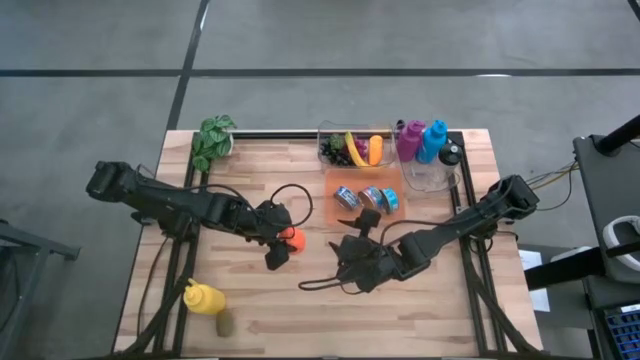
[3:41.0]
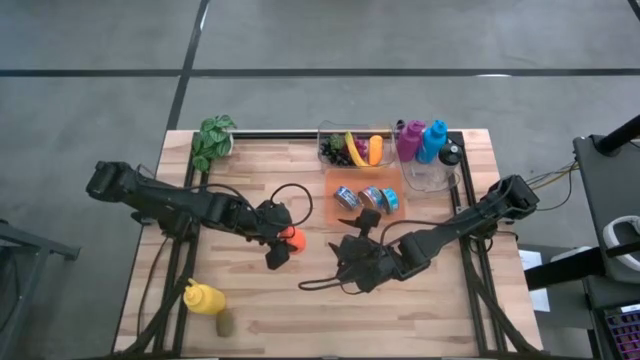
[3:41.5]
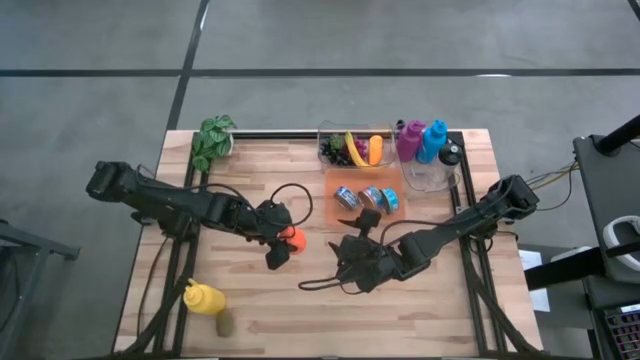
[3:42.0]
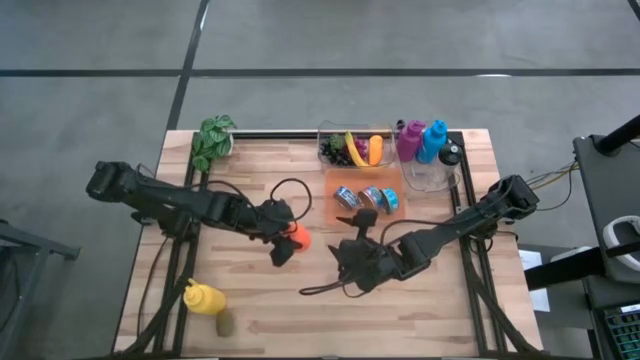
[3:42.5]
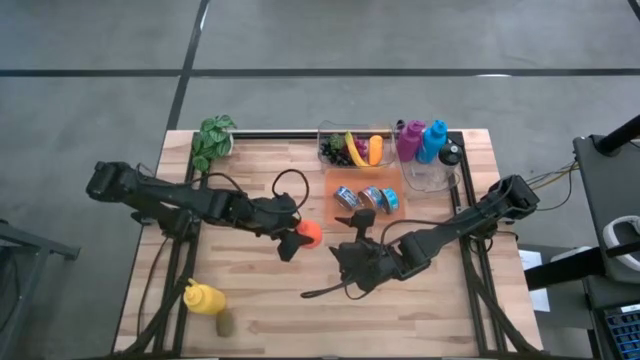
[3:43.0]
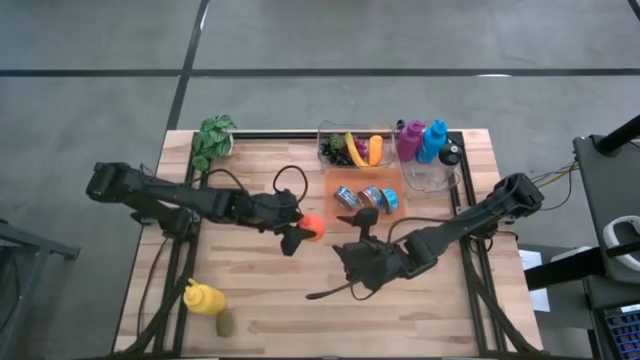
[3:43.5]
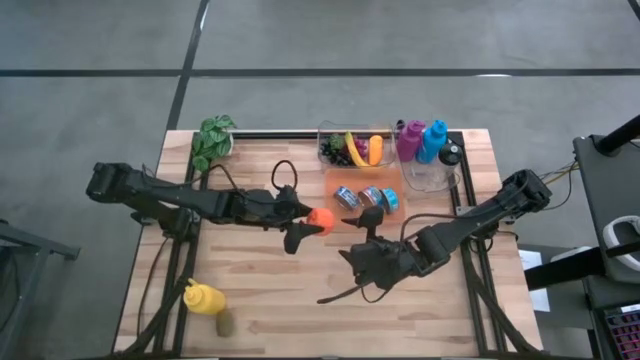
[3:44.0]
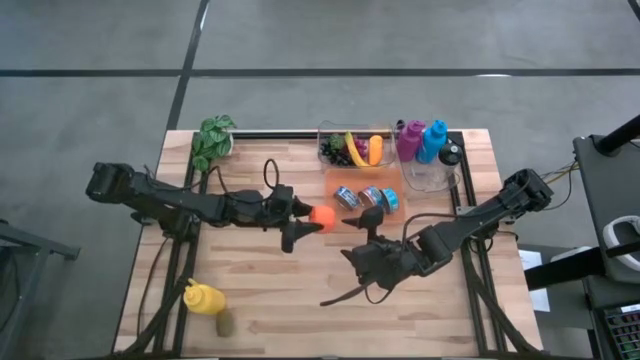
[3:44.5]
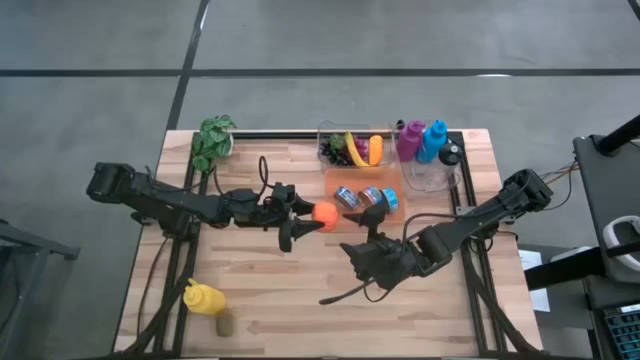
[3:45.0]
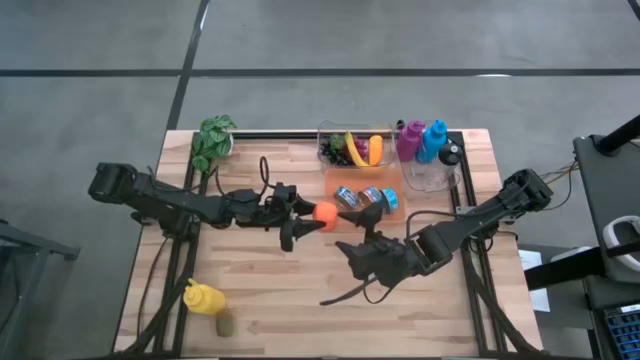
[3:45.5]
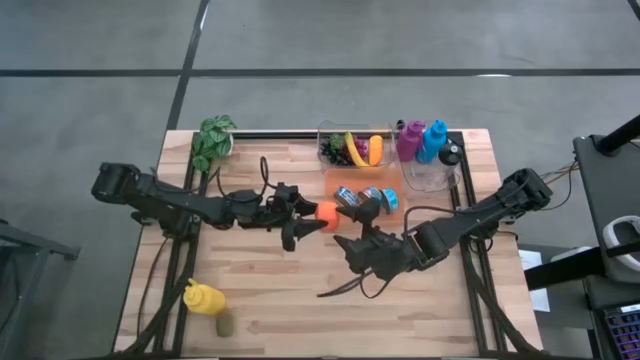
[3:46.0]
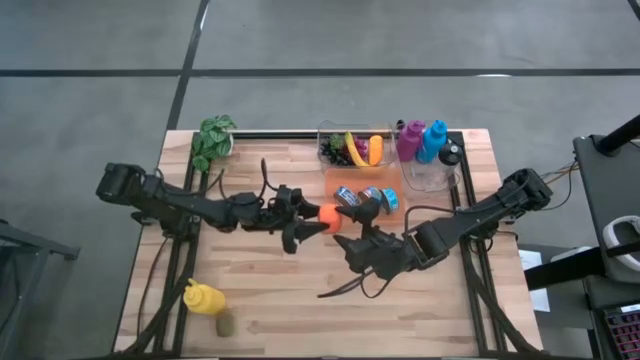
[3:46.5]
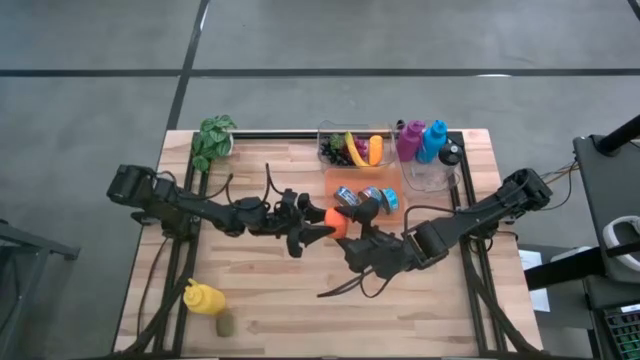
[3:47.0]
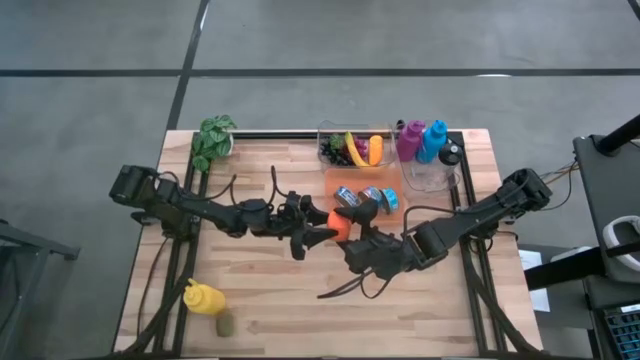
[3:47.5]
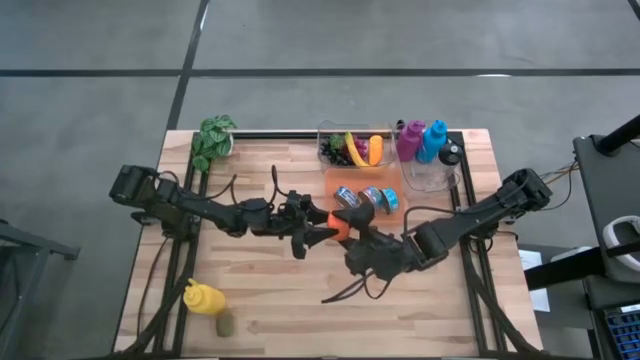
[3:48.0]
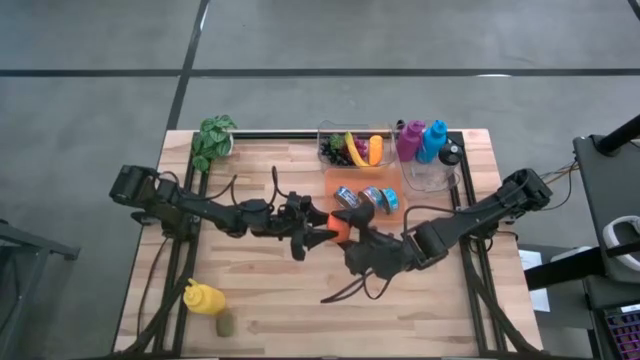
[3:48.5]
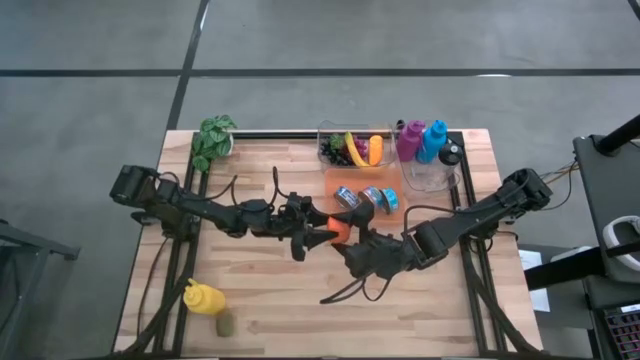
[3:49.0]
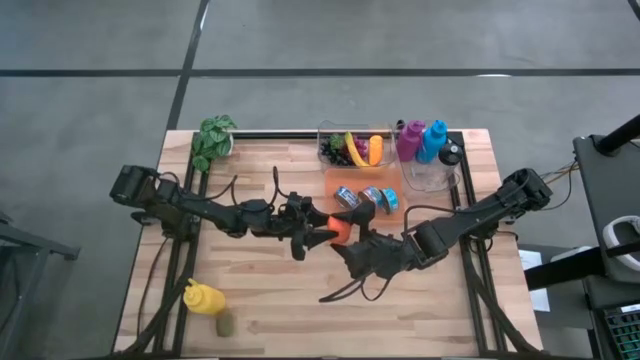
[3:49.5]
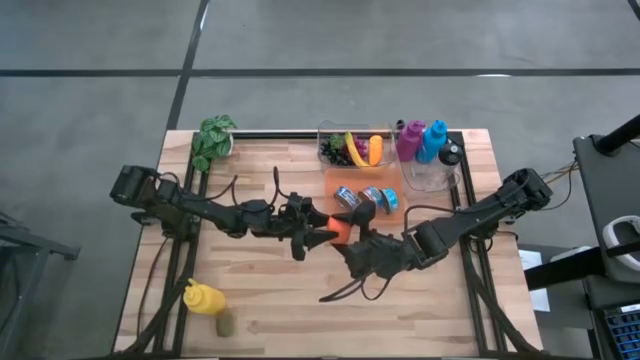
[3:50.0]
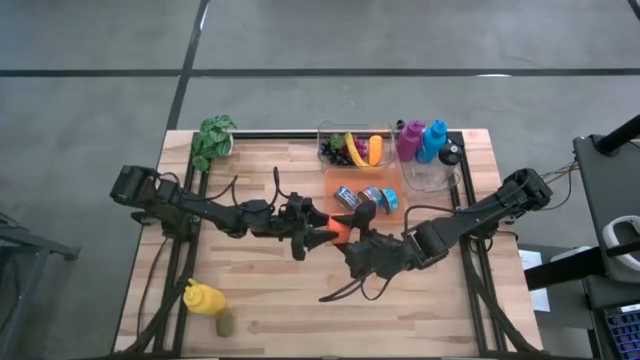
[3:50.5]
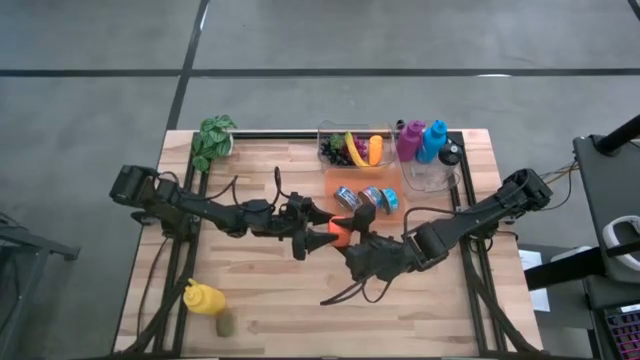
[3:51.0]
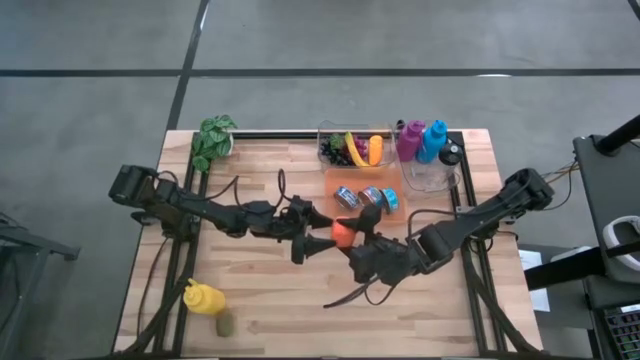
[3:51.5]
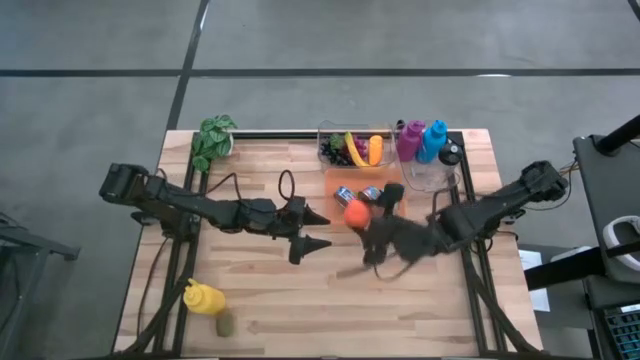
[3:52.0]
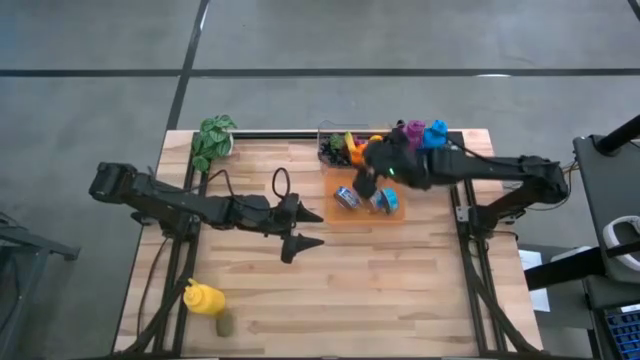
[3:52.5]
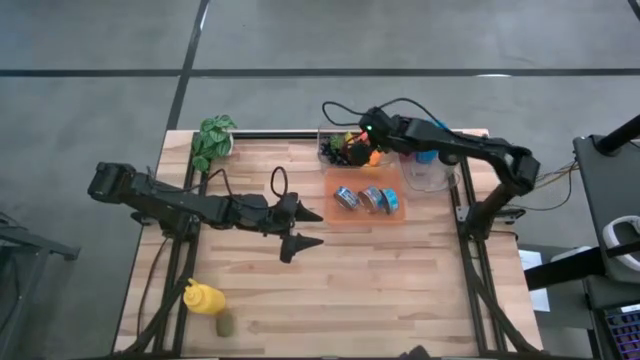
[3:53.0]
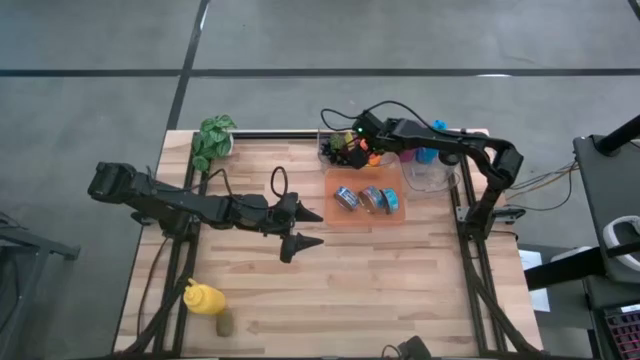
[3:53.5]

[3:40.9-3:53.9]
Task: Pick & Place Food Item
Put the orange into the left transparent bin

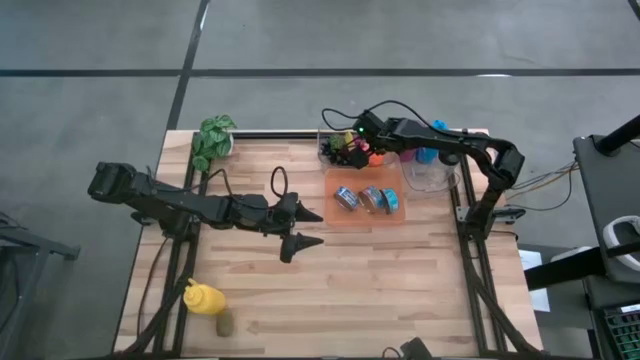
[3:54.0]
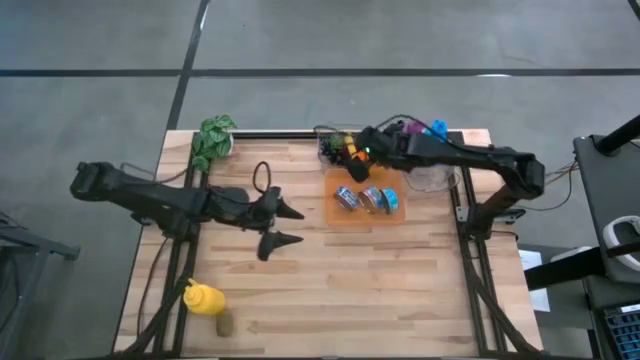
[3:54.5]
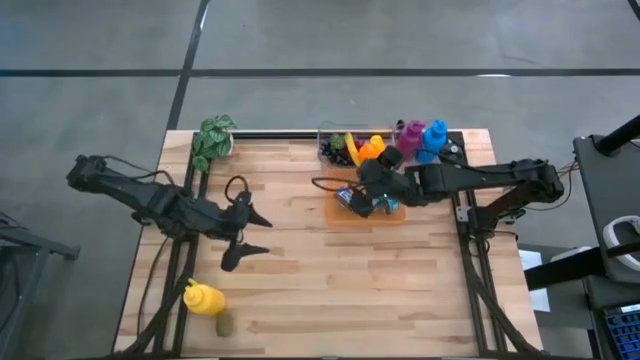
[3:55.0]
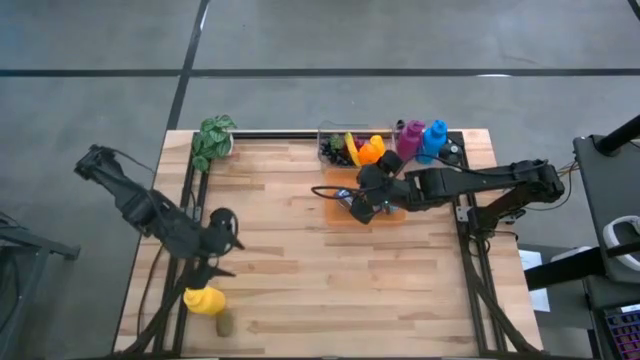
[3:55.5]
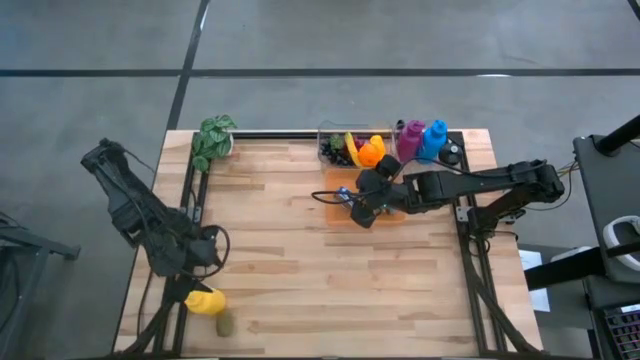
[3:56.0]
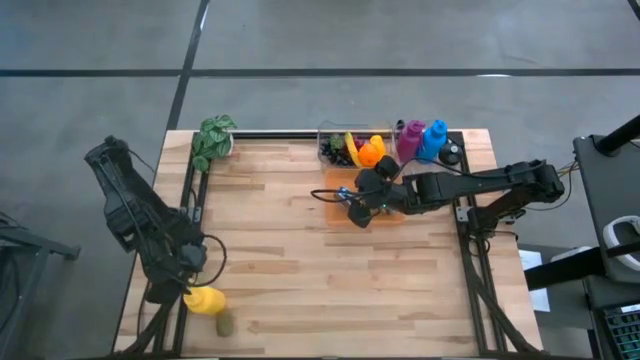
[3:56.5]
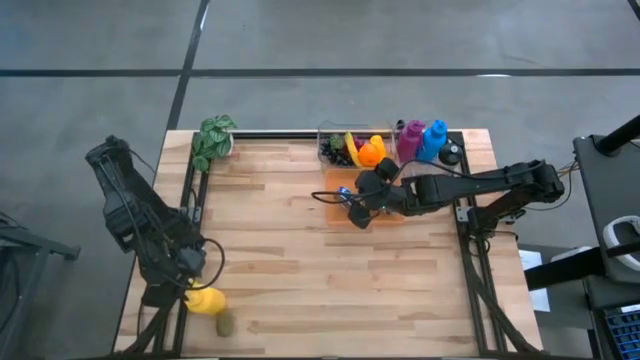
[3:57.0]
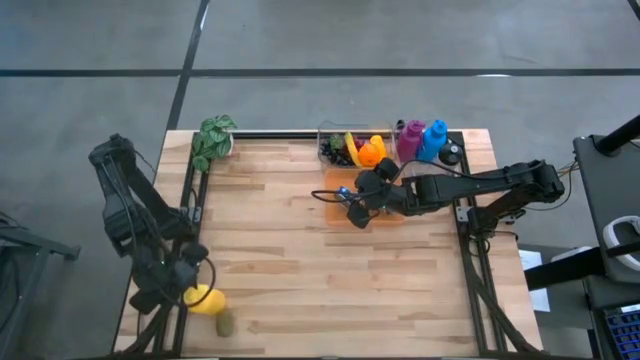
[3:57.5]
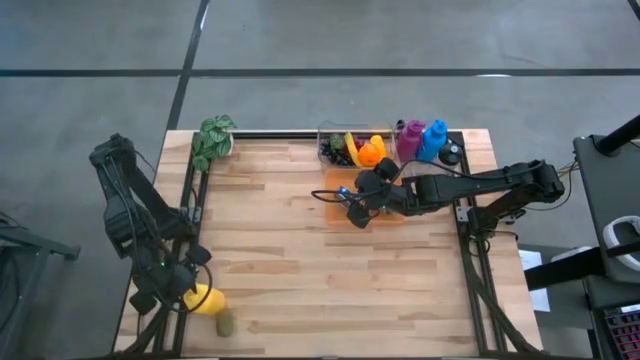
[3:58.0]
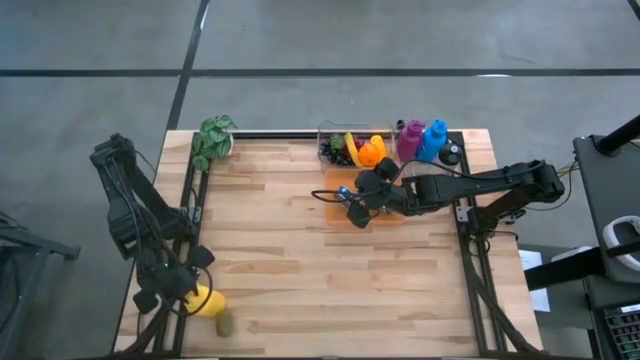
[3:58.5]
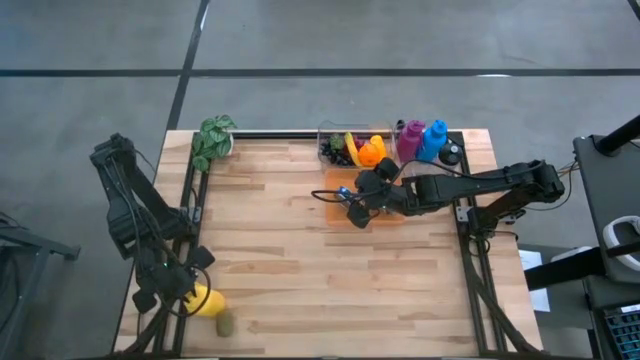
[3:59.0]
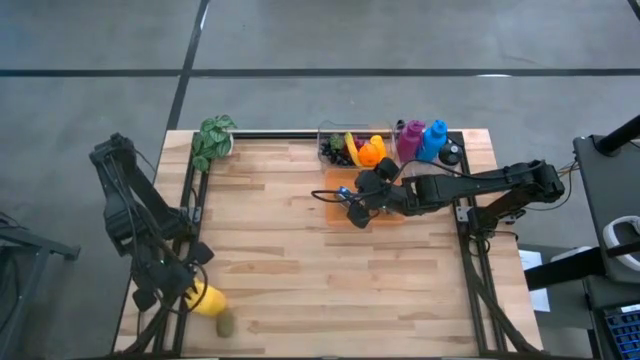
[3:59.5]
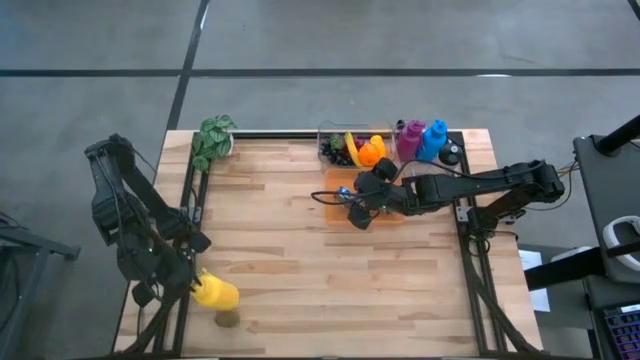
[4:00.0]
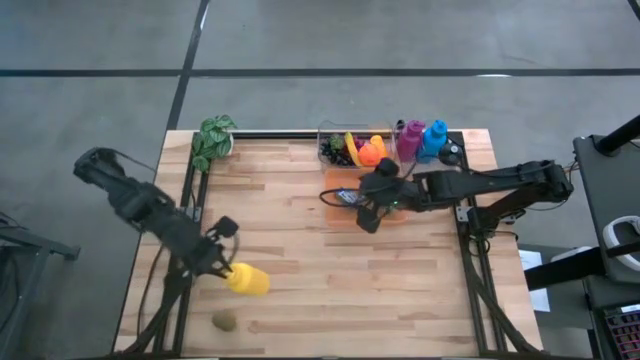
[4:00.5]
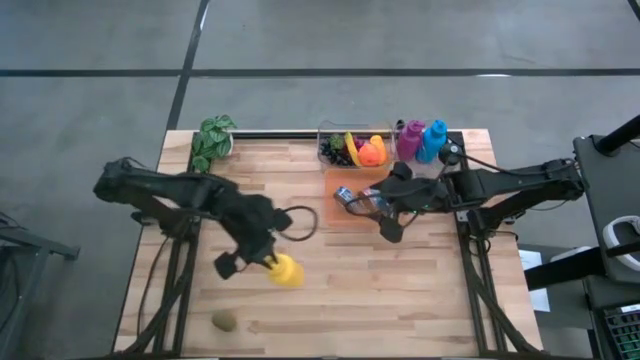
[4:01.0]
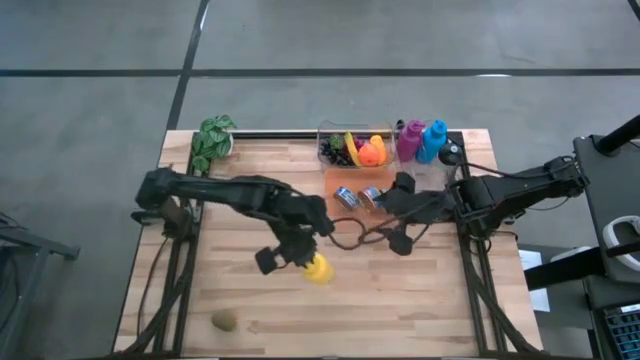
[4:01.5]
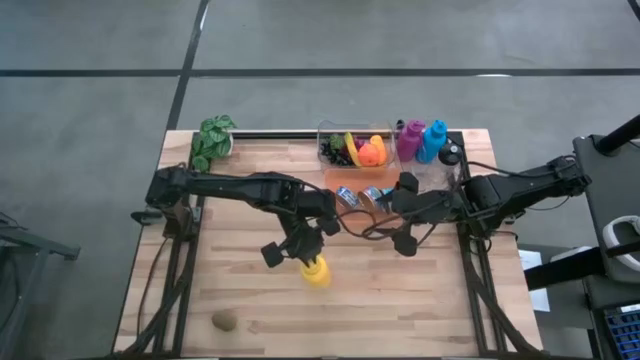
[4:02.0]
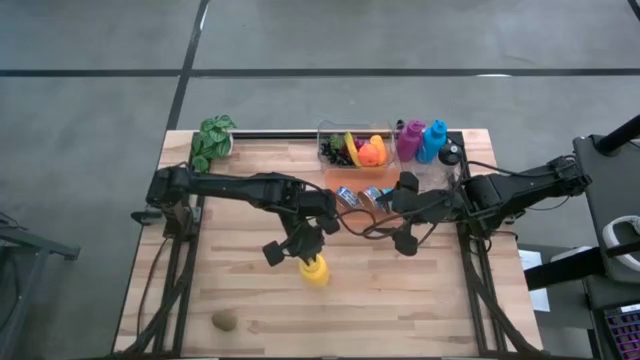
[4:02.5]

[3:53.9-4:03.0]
Put the yellow water bottle into the right transparent bin
